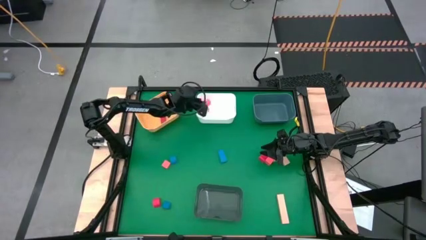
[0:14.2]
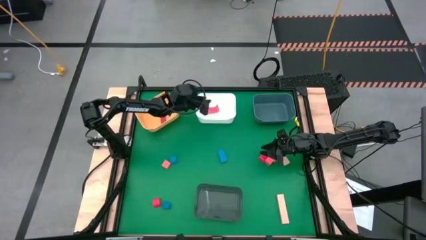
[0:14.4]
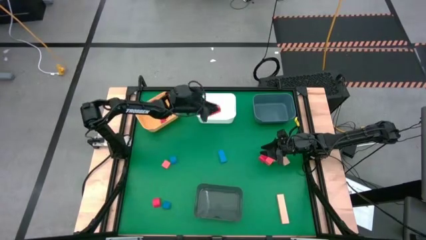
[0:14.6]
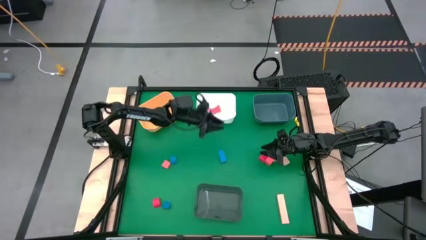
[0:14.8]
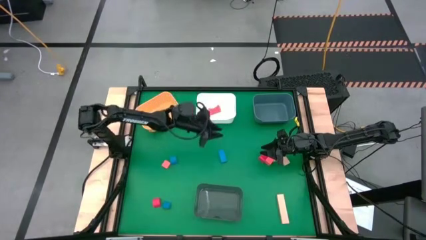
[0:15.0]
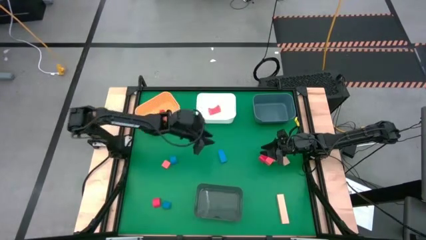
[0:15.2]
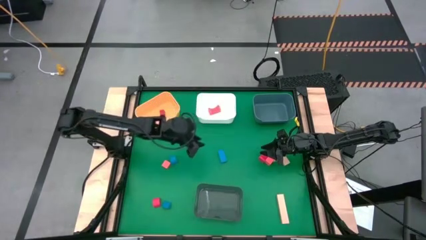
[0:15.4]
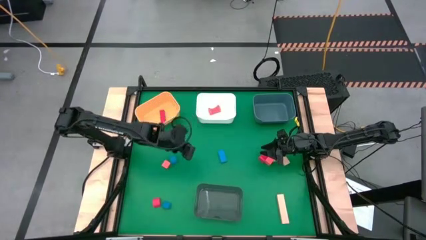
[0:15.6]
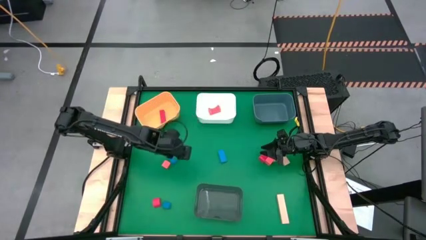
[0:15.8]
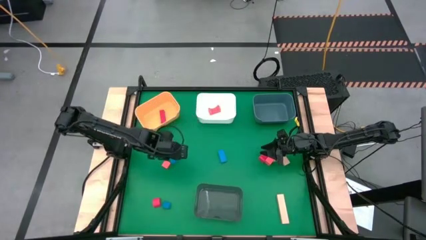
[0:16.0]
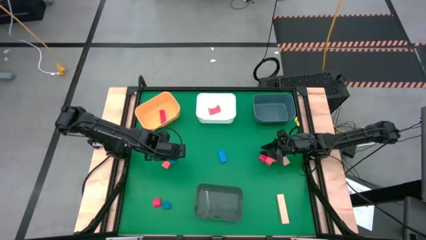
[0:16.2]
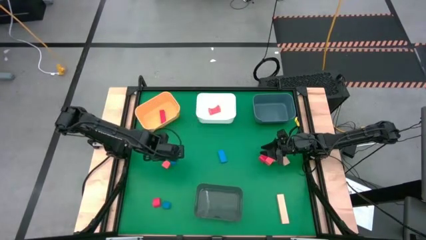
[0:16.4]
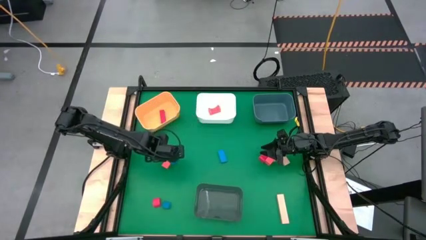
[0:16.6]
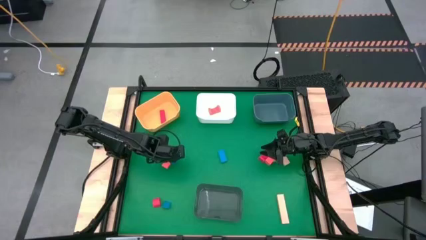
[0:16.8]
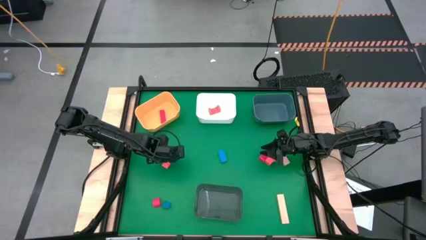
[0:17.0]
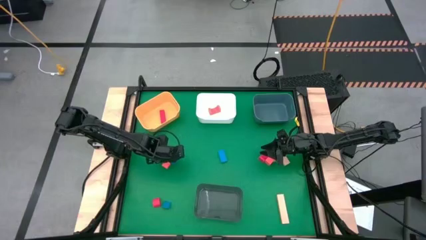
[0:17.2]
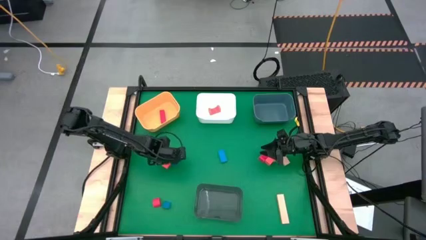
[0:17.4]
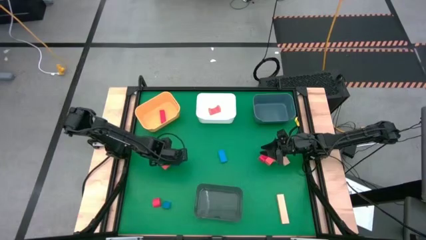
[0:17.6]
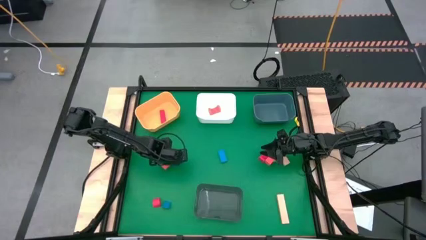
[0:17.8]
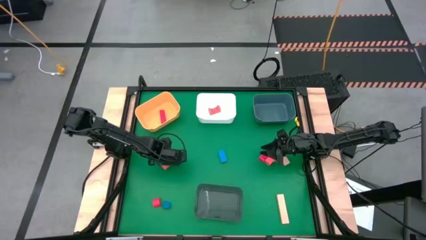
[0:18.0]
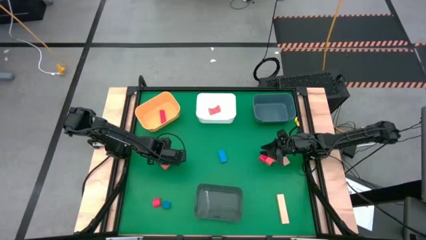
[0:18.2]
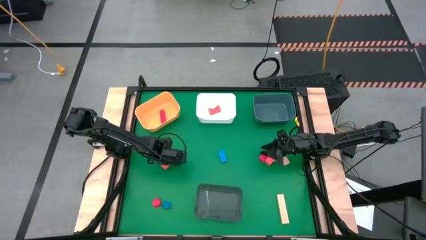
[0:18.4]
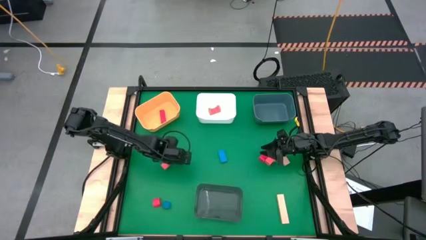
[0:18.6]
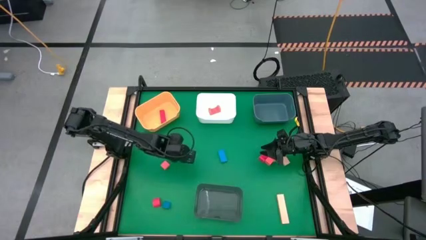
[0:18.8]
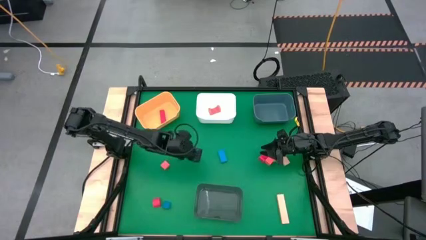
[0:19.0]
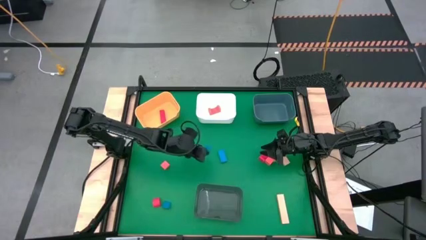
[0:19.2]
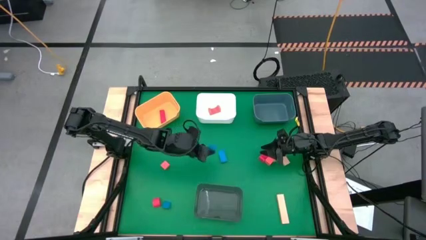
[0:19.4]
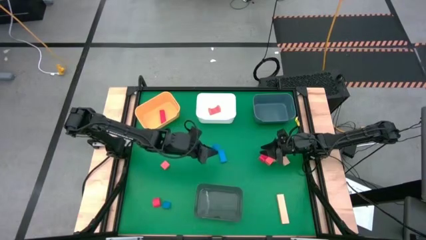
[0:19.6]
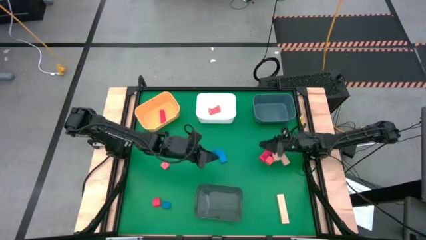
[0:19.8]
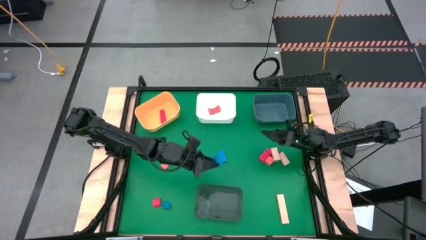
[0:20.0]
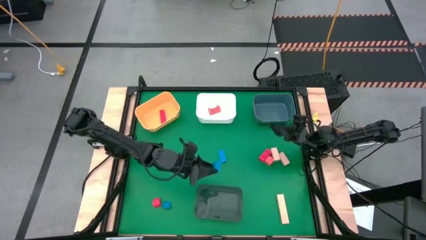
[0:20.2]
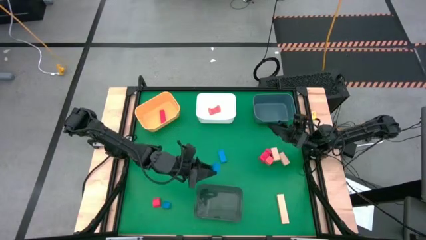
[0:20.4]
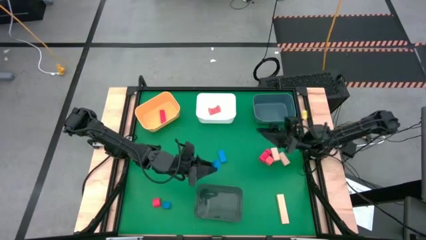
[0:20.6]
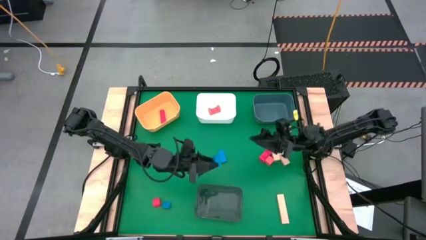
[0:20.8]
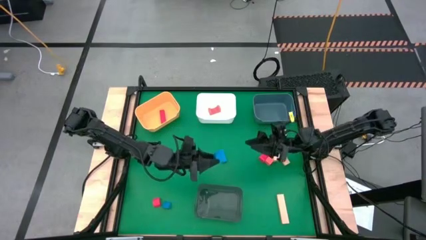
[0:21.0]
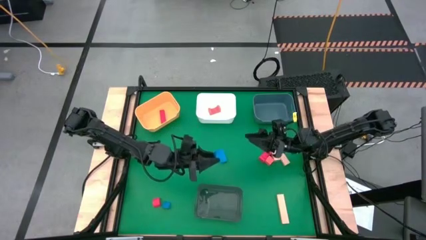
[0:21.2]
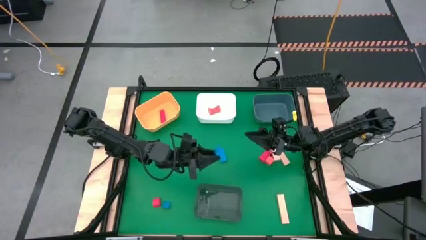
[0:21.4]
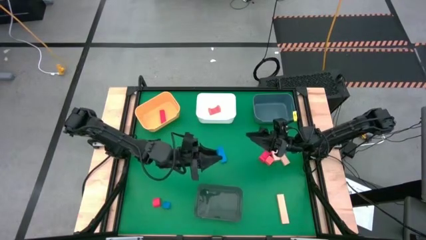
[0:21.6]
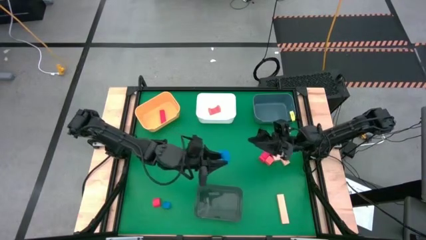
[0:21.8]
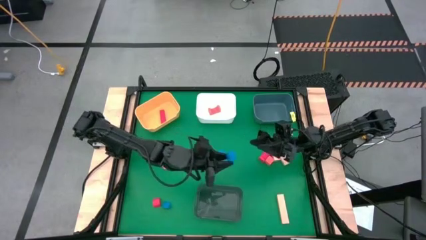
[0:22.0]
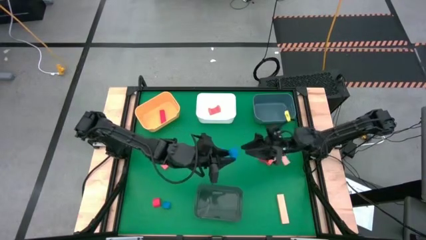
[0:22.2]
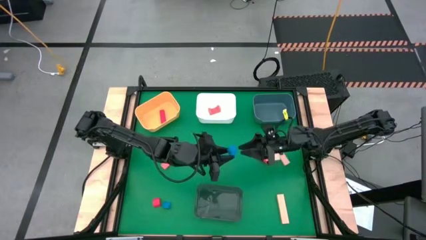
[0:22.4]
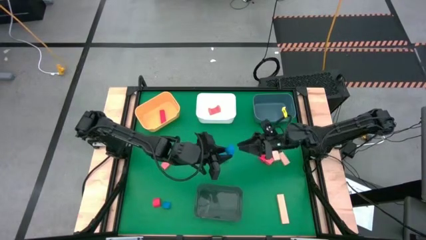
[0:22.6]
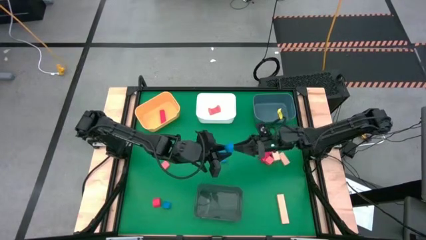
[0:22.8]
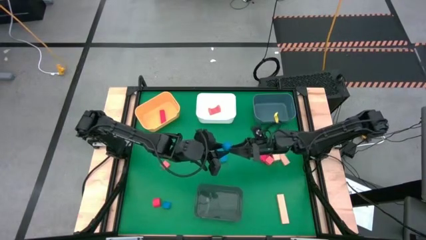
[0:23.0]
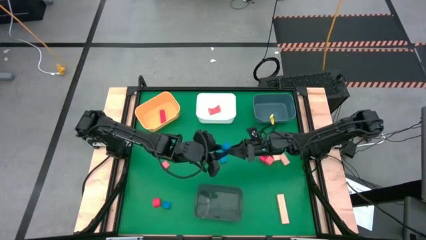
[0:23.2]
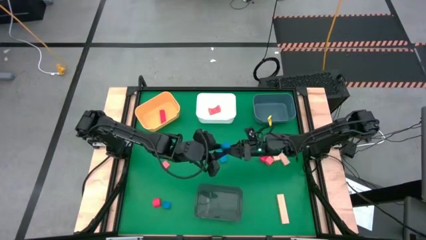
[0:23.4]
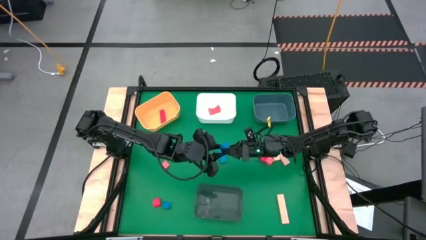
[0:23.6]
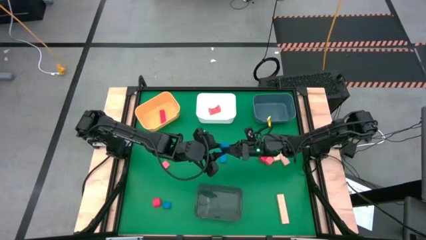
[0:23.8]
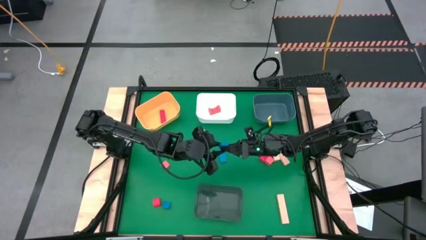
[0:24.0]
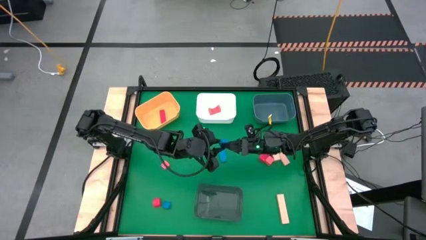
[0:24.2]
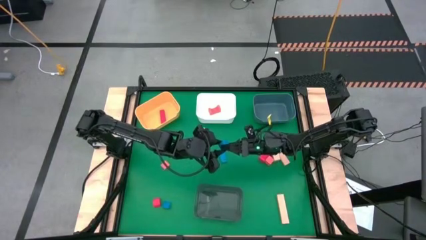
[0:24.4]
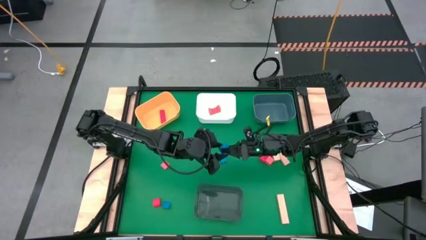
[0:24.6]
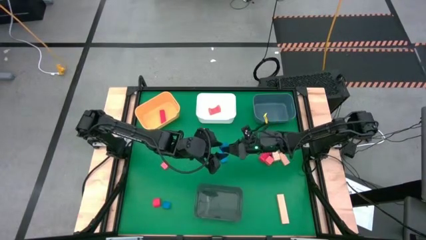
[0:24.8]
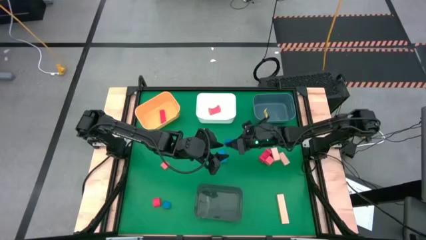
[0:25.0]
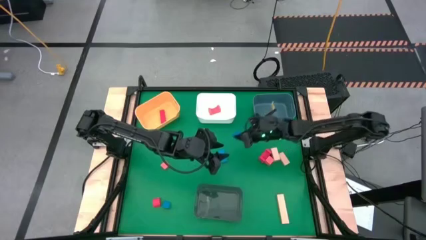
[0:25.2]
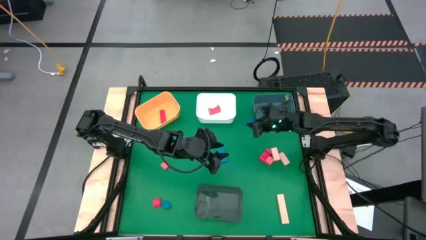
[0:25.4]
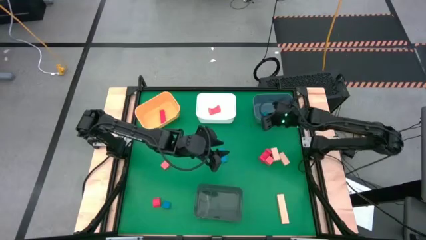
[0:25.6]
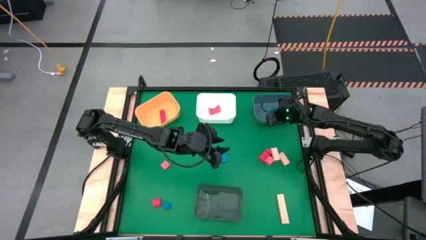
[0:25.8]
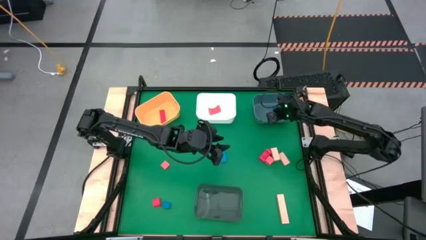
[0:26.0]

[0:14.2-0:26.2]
Task: Sort & place blocks by color
Put the blue block into the blue bin
